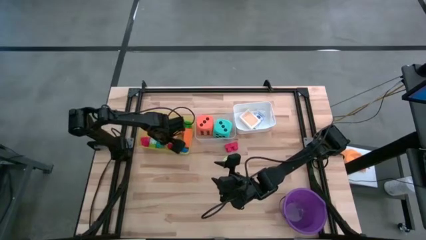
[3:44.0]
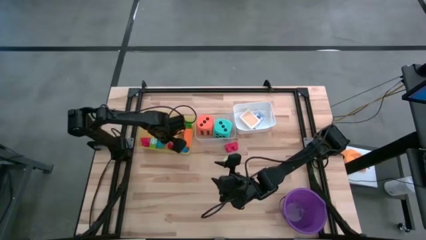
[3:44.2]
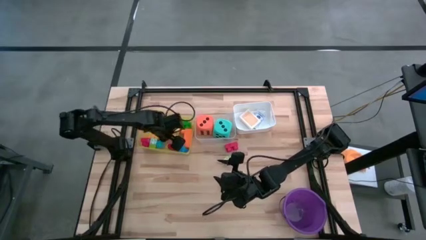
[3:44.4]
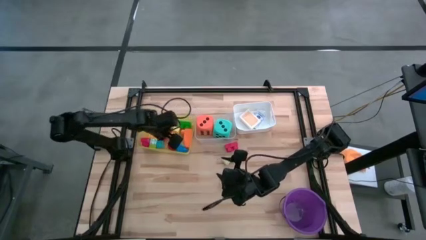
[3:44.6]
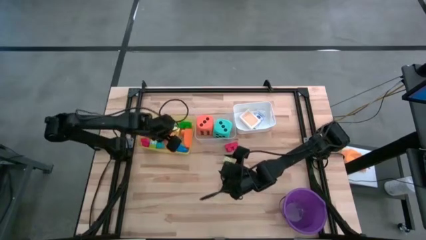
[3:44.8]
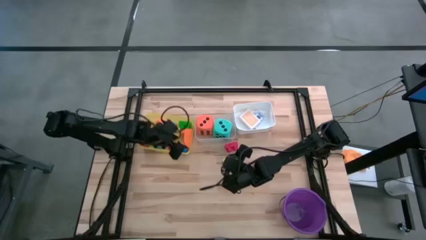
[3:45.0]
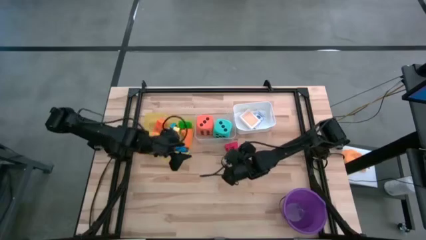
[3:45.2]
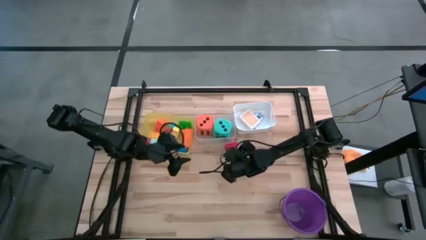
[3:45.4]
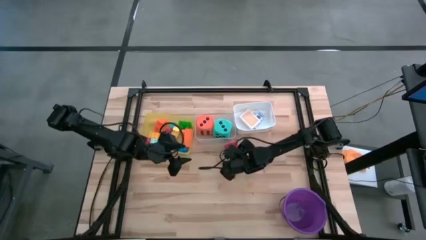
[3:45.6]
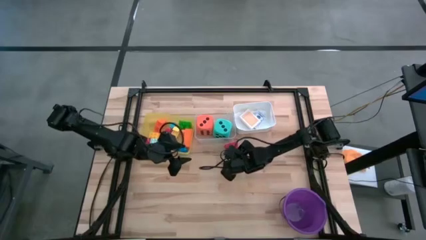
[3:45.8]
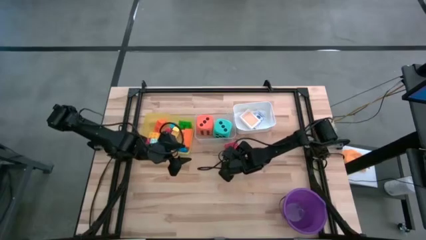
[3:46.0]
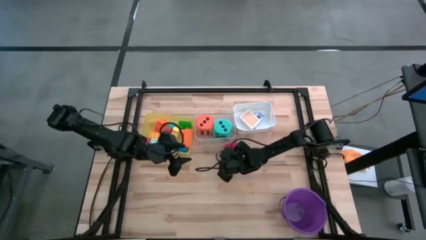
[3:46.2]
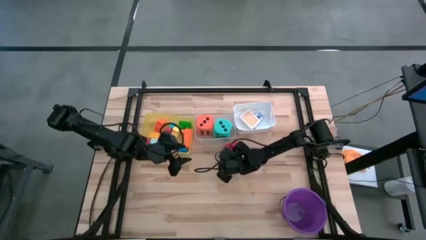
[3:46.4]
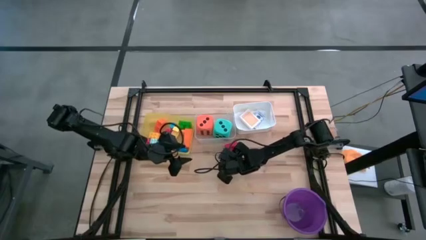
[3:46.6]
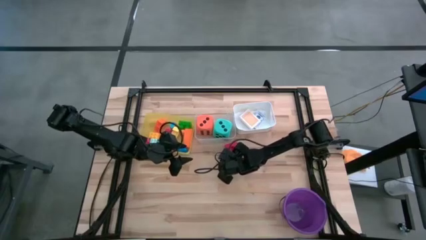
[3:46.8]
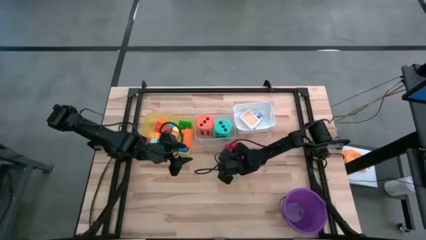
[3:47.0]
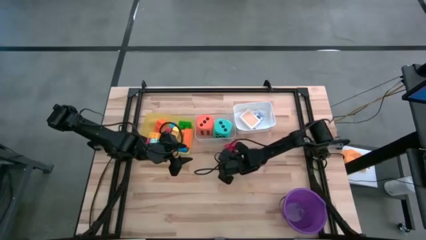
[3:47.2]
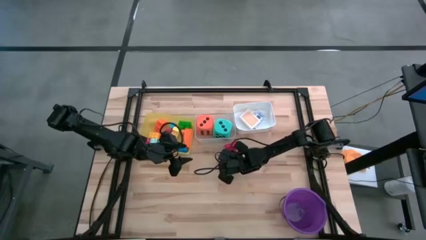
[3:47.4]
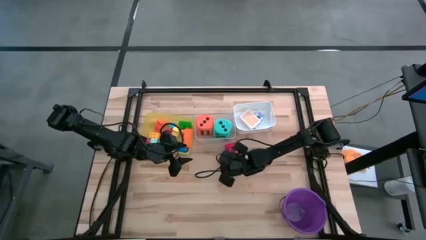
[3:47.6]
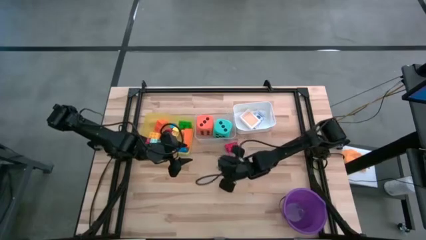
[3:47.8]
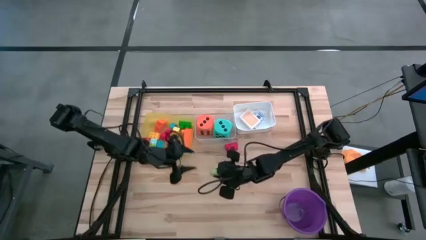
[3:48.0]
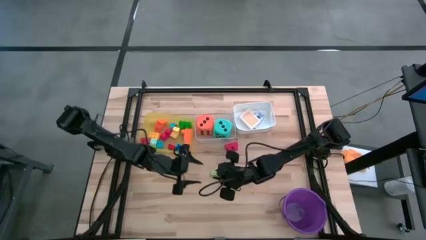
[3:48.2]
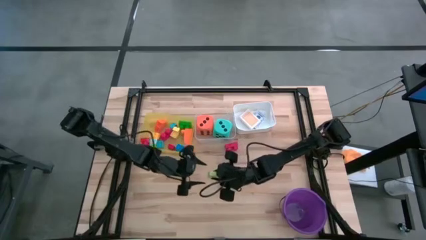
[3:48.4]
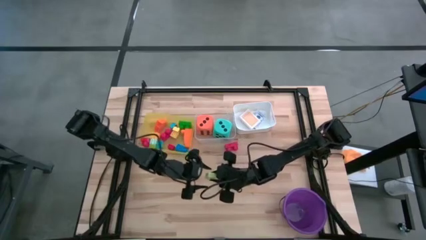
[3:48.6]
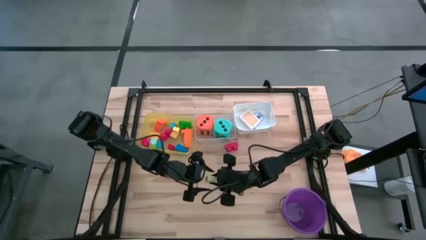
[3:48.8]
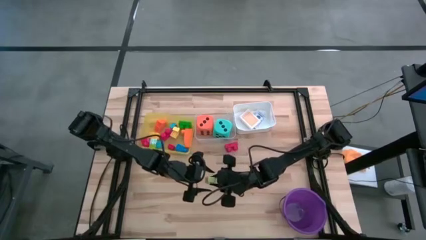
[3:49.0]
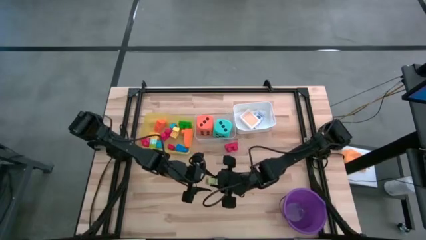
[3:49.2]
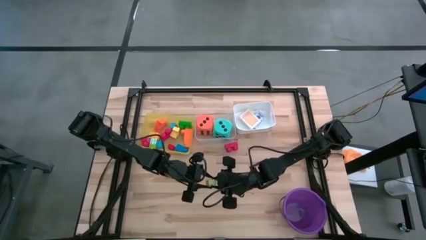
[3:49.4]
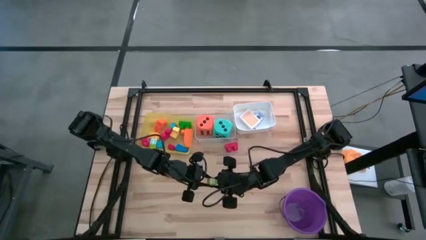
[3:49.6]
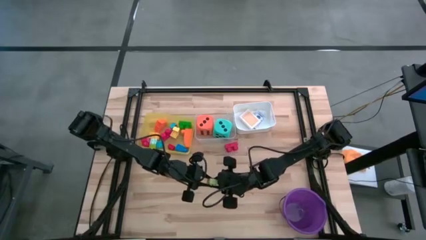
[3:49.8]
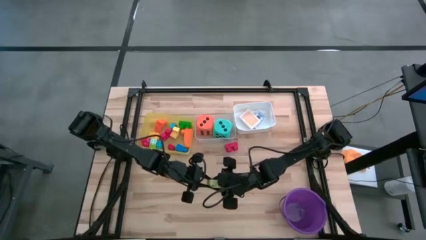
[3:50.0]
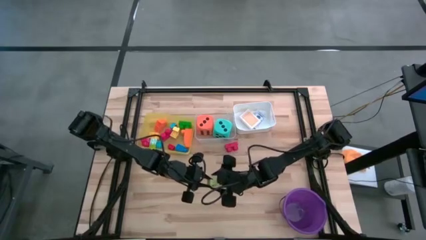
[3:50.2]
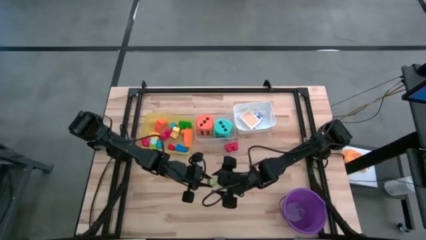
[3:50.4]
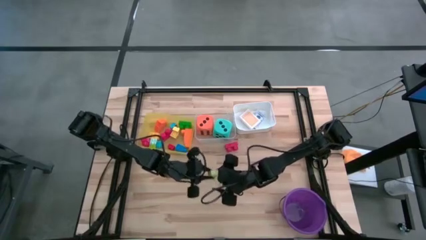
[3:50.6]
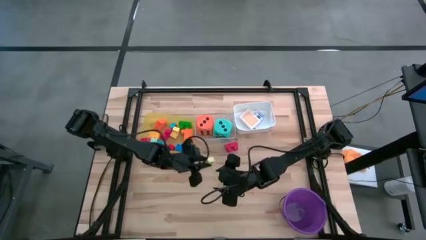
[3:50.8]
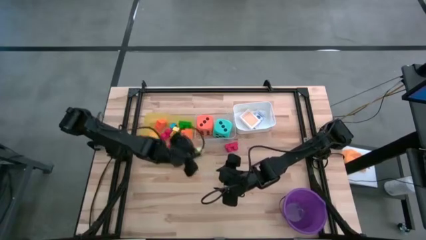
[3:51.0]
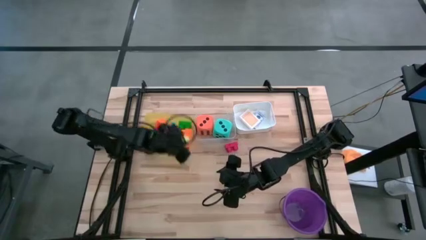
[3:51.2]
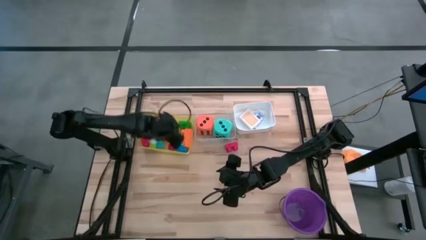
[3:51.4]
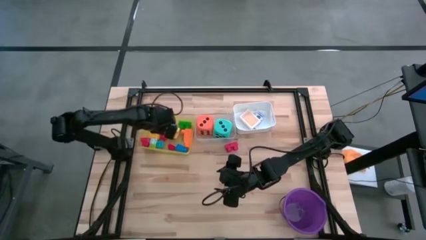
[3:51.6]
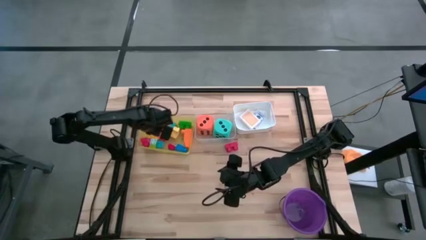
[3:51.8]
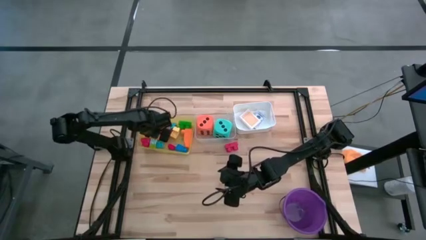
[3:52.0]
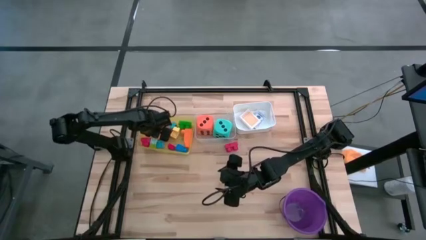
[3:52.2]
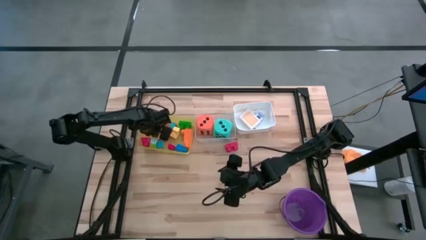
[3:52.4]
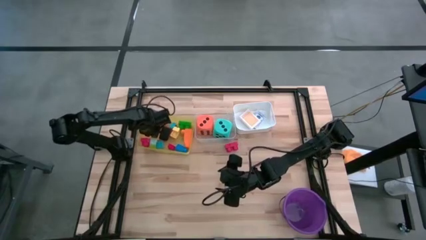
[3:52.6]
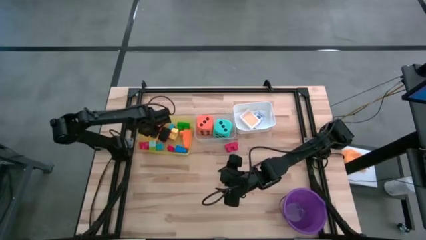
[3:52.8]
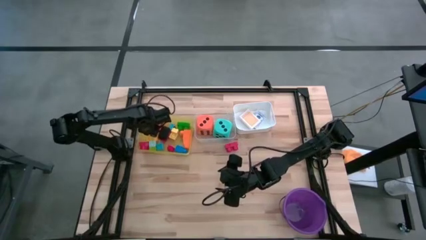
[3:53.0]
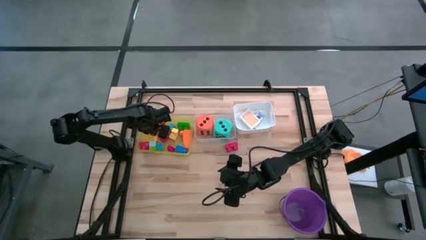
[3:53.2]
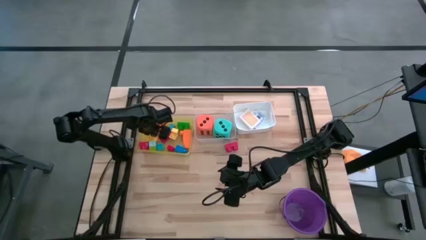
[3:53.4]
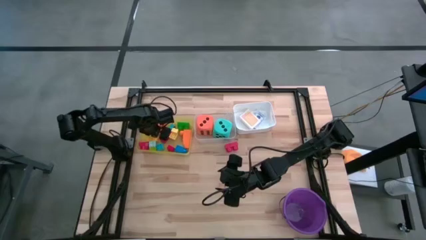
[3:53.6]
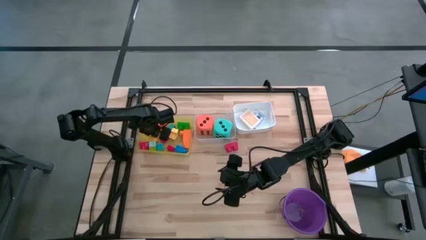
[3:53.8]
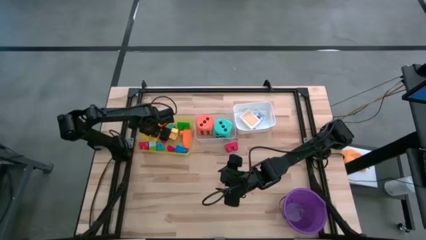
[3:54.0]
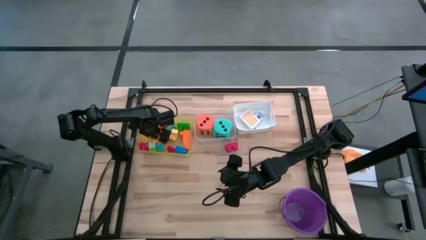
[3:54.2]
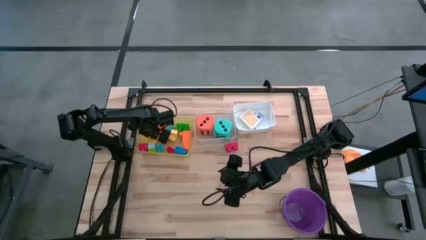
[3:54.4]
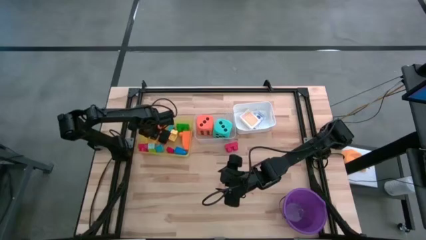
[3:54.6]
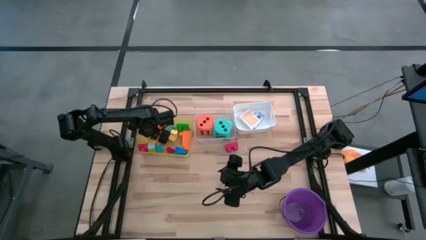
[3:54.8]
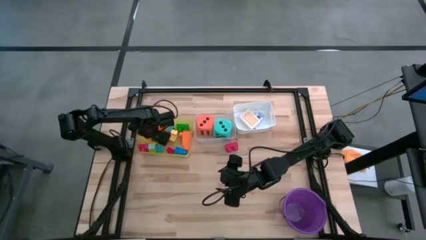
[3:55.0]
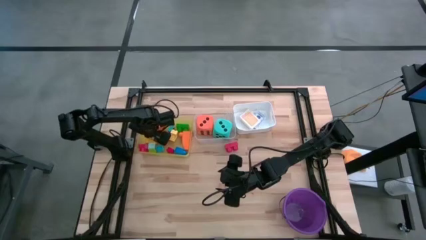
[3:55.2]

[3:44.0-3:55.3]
Task: Pick & Place Toys
Put the light green game piece into the yellow bin

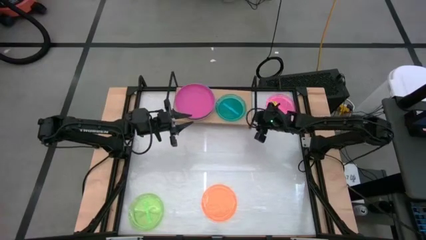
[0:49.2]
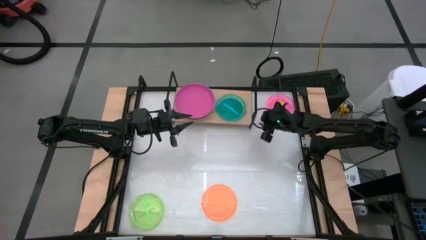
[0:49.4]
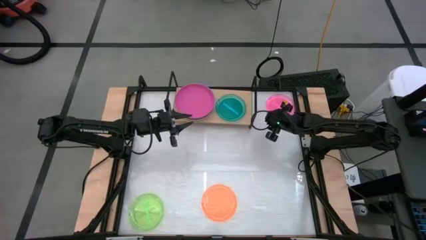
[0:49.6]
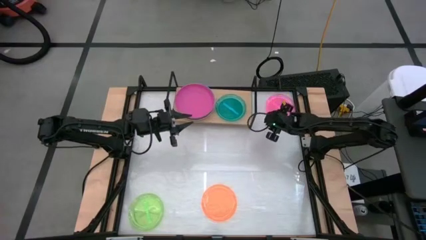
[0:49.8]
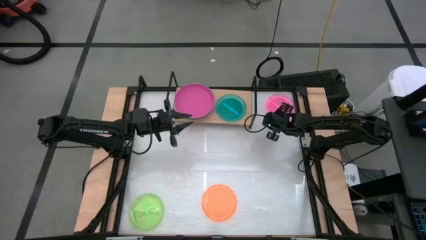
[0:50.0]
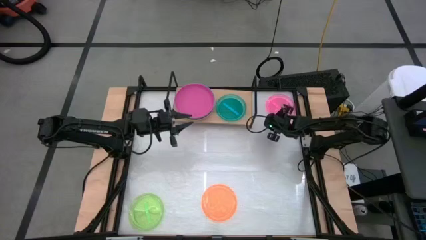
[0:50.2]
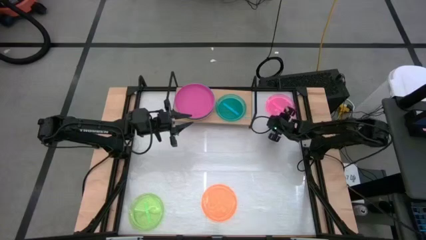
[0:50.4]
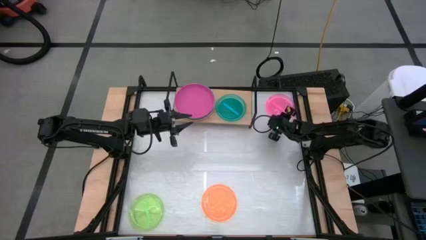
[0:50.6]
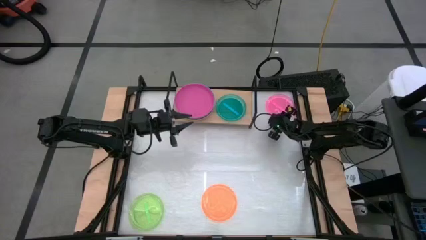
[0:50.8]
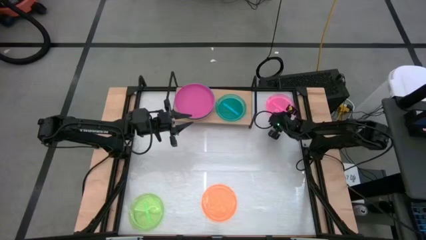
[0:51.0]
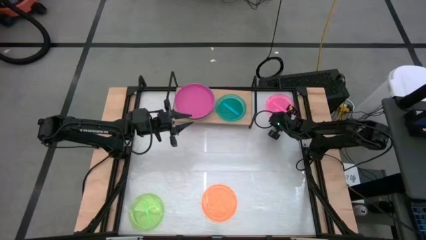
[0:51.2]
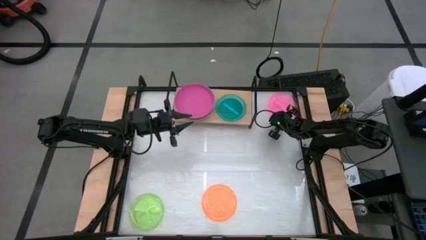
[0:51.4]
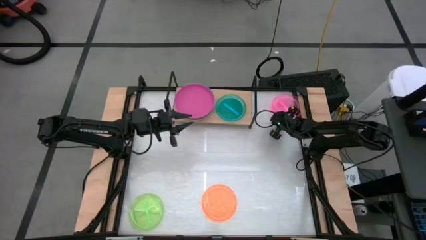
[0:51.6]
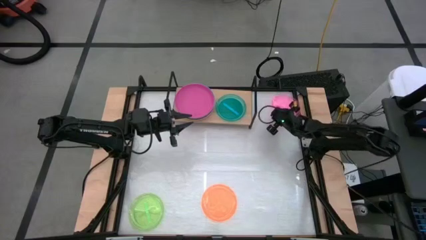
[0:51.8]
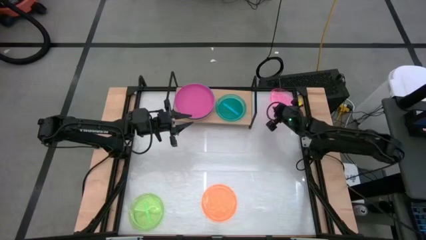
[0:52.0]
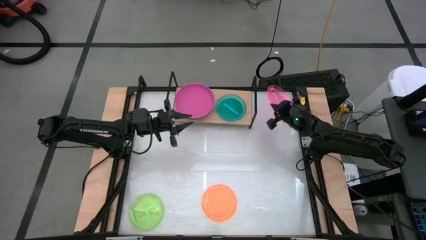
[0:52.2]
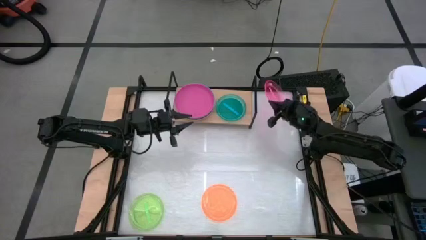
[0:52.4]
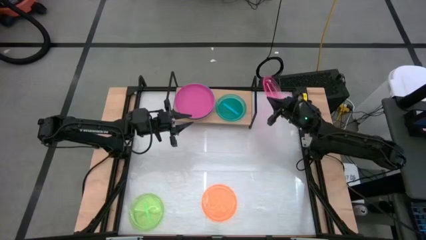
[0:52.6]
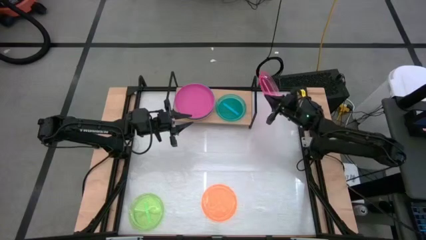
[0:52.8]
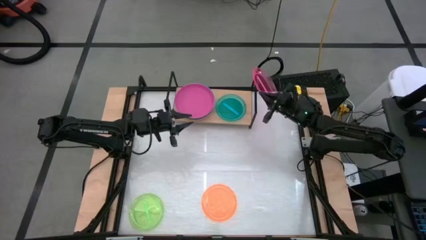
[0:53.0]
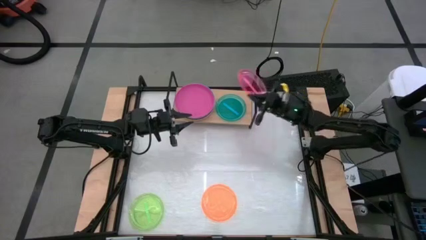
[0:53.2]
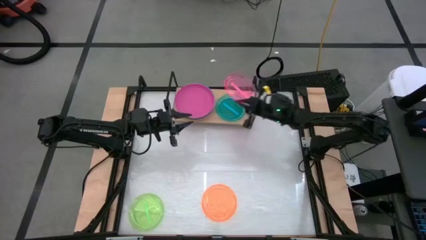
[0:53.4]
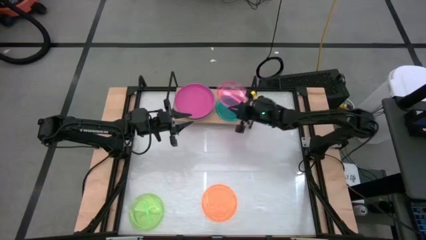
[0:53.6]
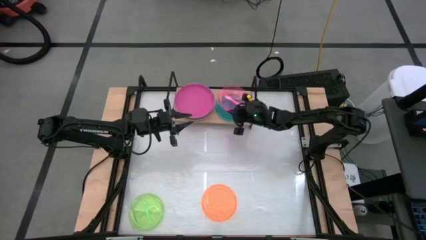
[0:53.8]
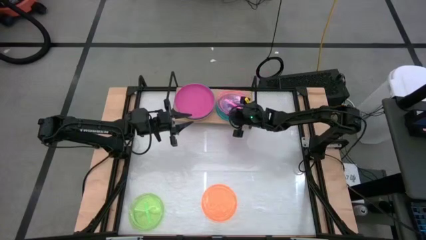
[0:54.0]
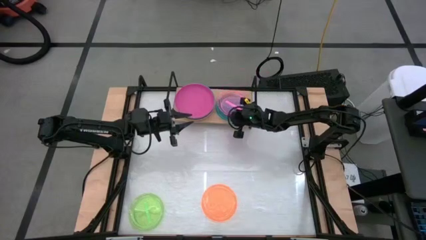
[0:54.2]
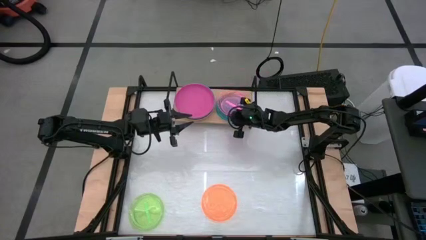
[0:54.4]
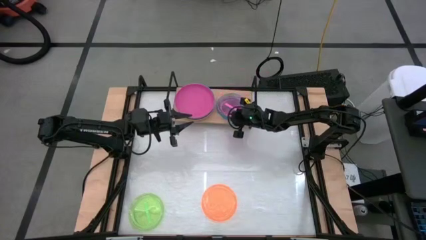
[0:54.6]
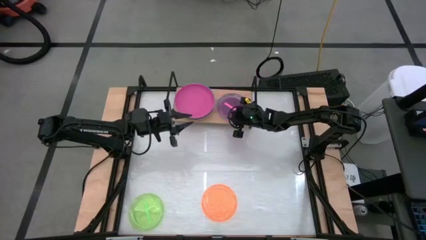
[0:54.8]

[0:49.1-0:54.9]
Task: Place and stack plates onto a shelf
Stack the transparent pink plate on top of the transparent sky blue plate on the shelf
